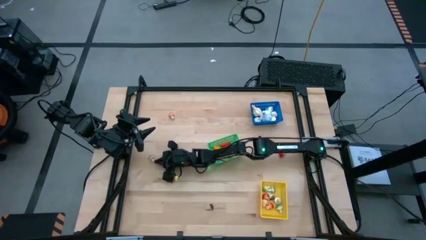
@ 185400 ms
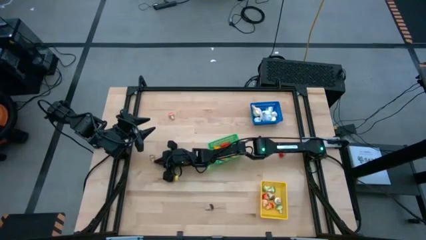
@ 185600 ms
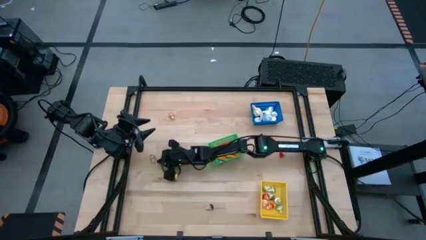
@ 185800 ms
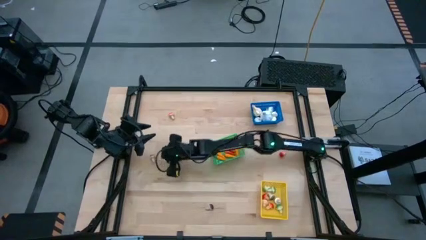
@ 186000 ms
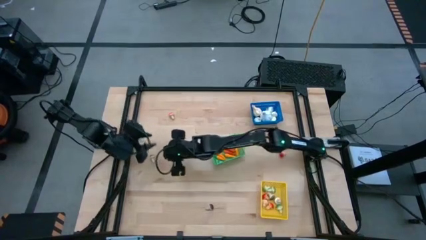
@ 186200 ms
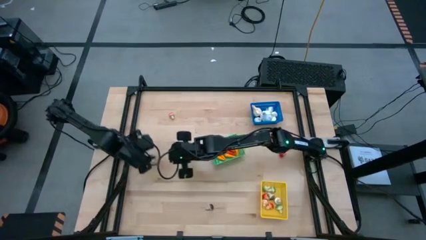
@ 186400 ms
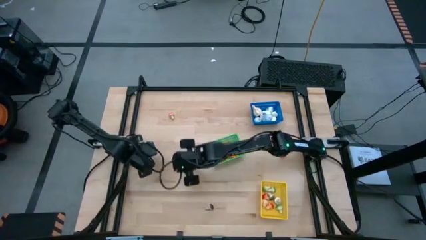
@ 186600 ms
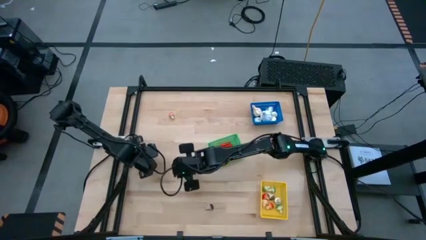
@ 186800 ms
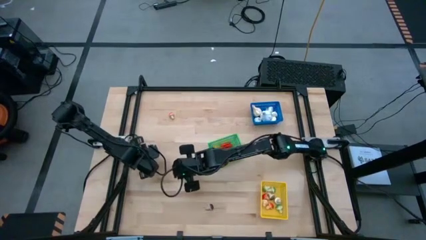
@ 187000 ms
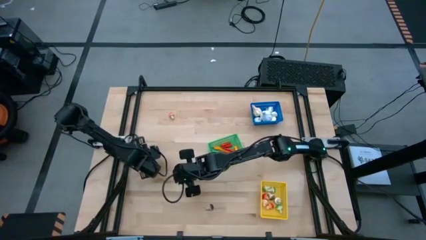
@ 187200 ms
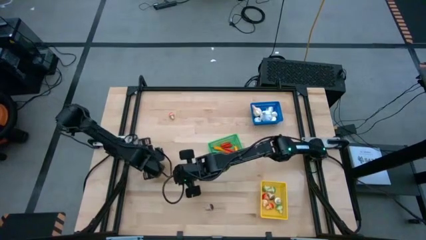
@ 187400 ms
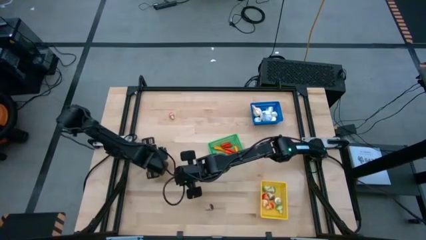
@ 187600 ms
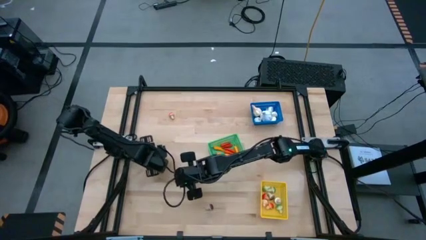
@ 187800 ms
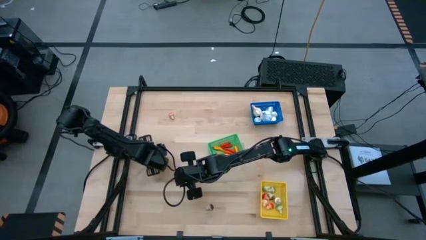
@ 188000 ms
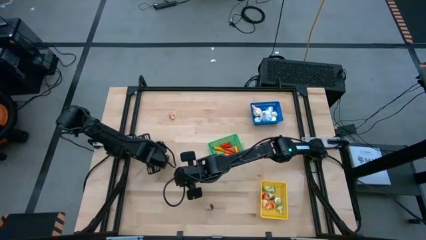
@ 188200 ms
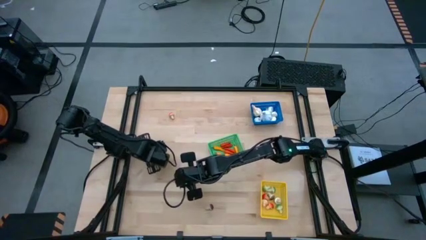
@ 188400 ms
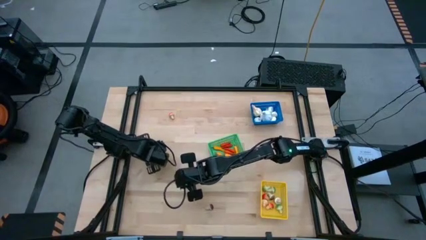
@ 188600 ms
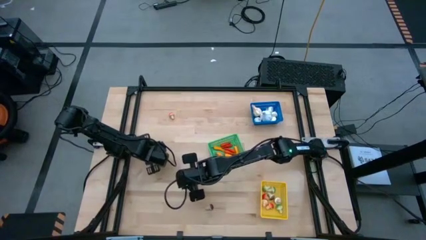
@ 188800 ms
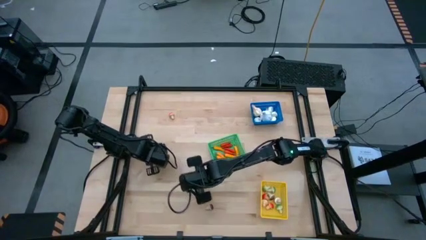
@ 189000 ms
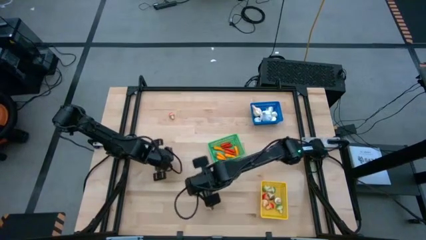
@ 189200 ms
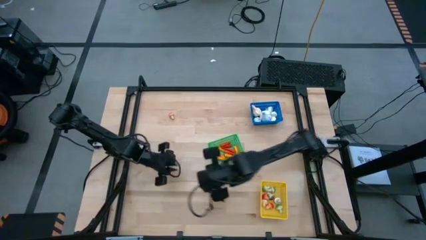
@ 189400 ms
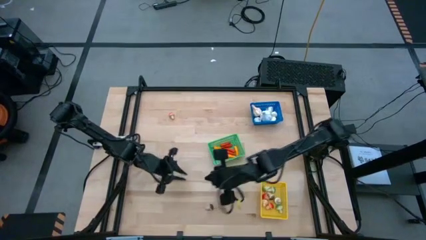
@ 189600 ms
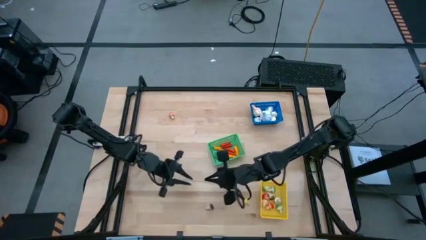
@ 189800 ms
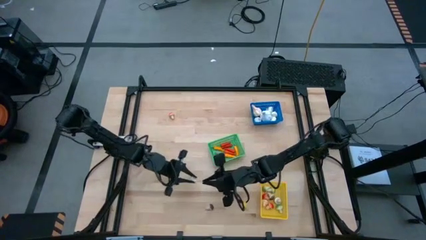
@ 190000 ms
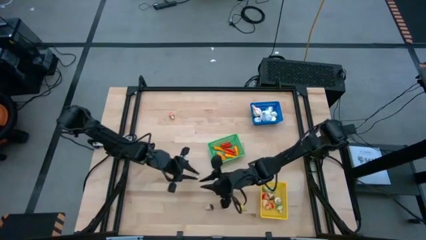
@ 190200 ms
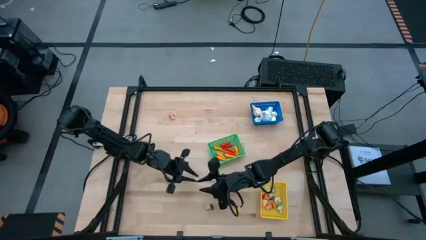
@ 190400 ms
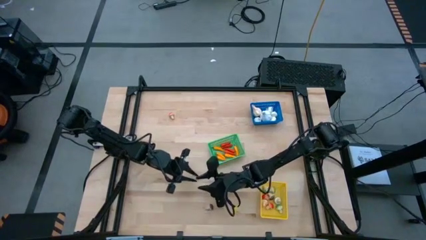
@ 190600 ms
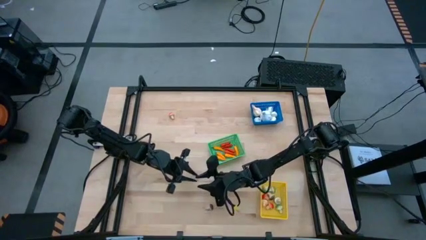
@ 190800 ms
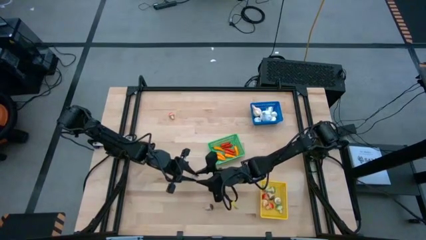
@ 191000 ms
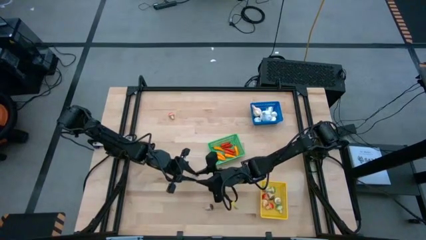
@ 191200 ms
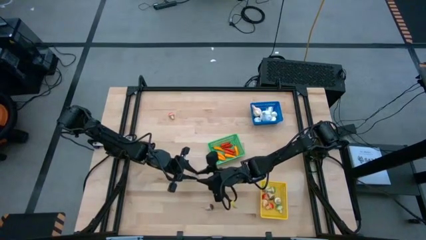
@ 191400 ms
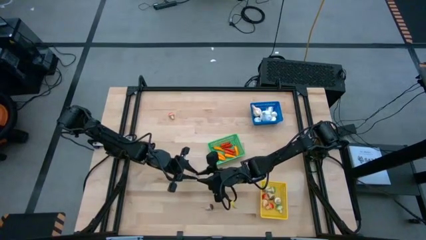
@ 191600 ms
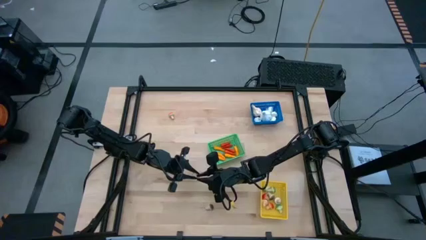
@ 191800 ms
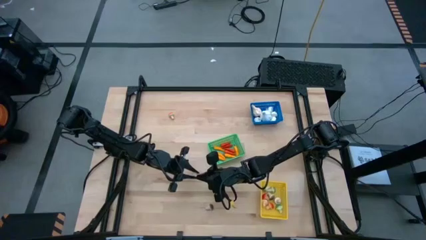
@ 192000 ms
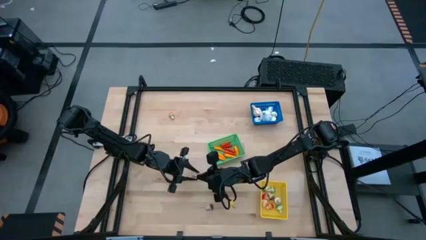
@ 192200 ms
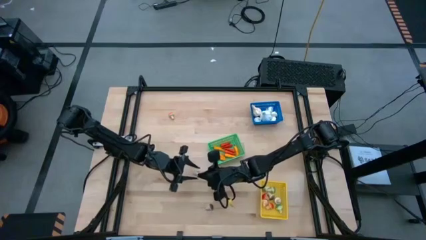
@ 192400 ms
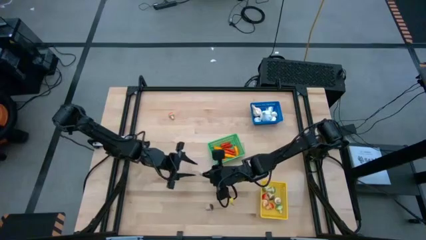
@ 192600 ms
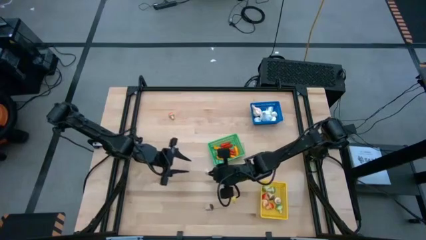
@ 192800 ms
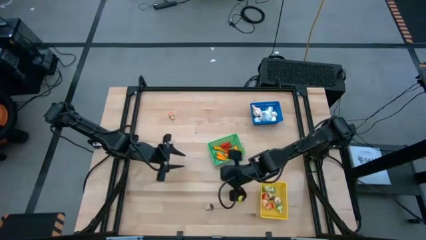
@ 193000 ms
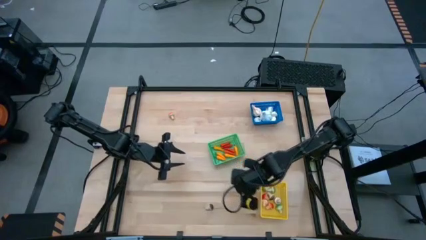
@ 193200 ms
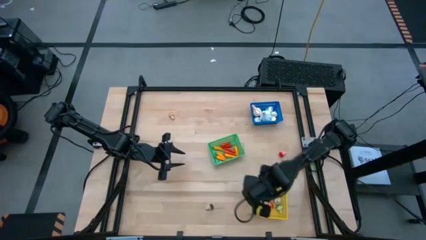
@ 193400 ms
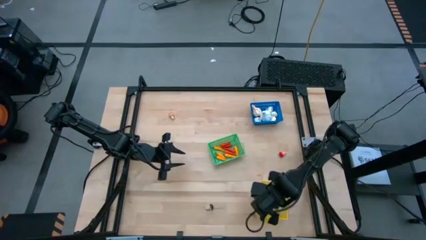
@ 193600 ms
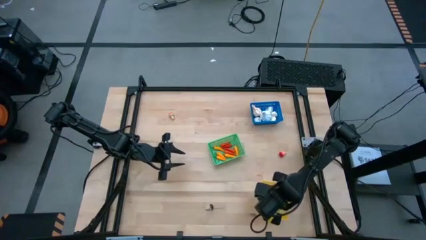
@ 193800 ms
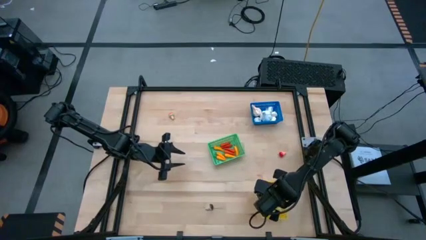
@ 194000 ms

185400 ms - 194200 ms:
Task: Sort produce into baskets
Put the brown mushroom into the yellow bin

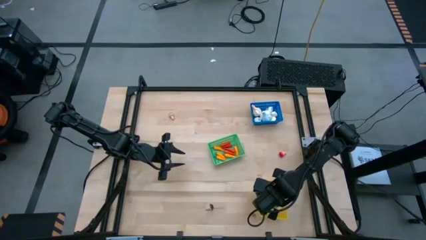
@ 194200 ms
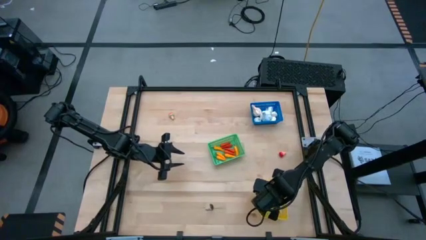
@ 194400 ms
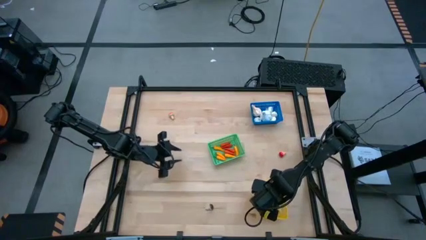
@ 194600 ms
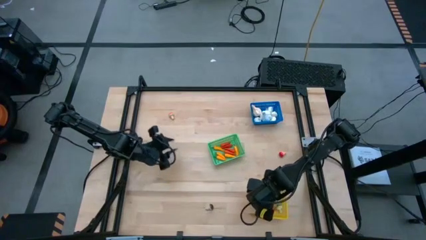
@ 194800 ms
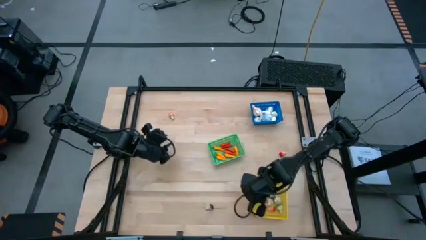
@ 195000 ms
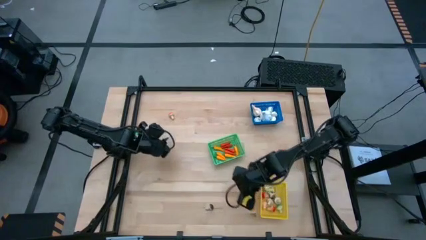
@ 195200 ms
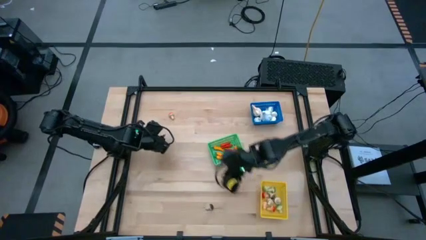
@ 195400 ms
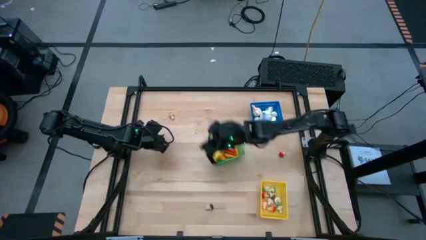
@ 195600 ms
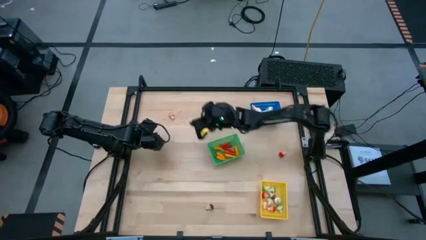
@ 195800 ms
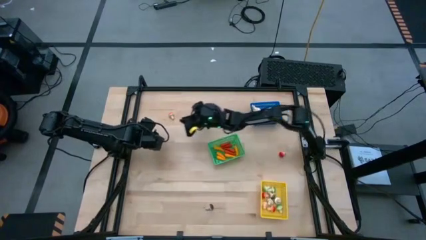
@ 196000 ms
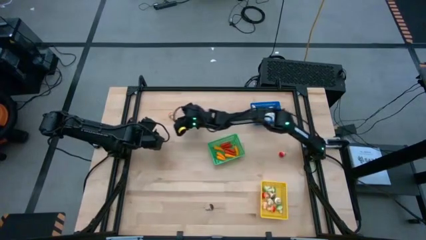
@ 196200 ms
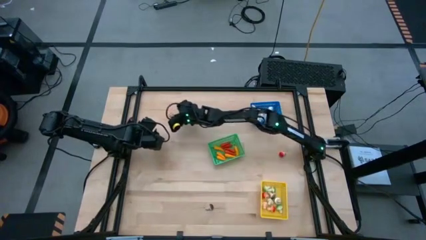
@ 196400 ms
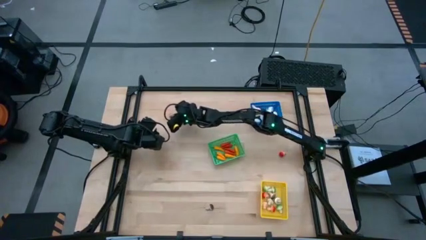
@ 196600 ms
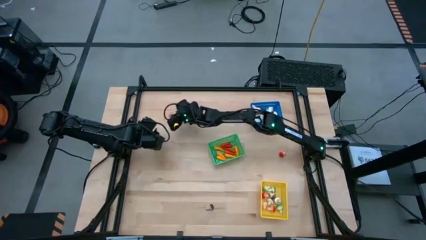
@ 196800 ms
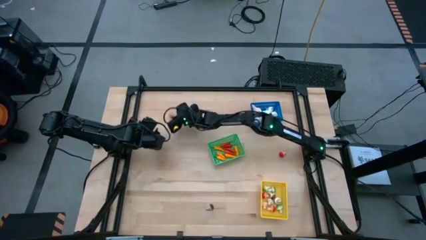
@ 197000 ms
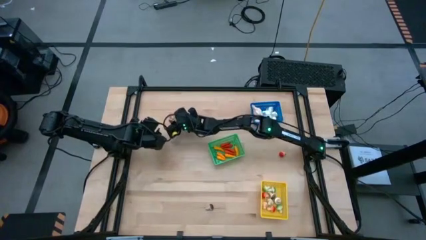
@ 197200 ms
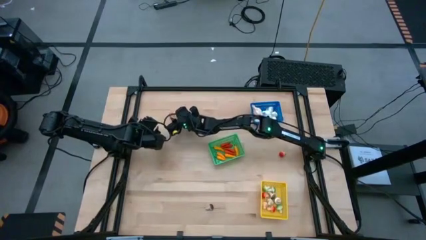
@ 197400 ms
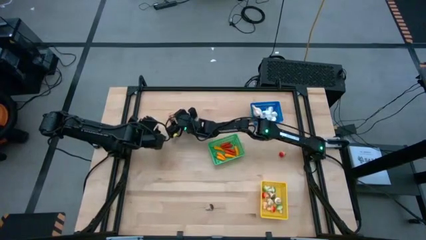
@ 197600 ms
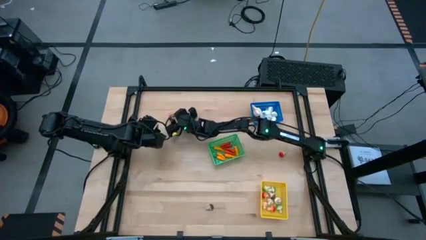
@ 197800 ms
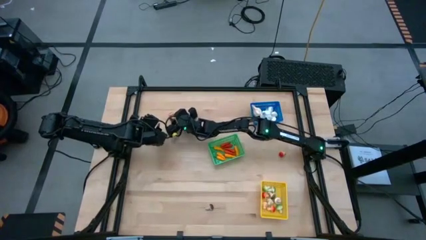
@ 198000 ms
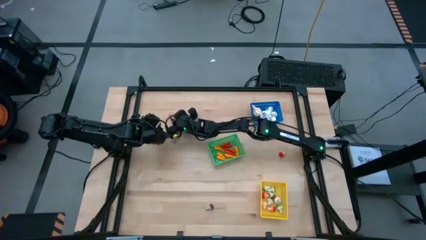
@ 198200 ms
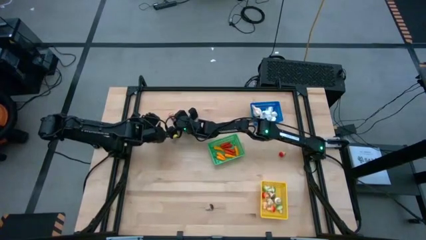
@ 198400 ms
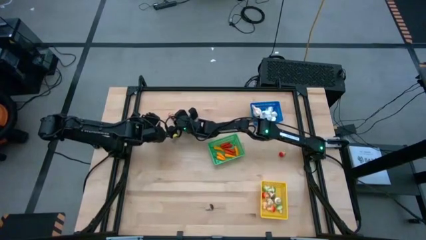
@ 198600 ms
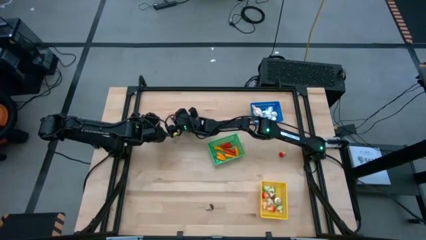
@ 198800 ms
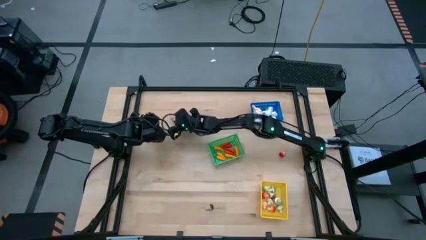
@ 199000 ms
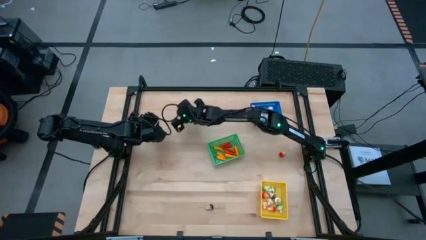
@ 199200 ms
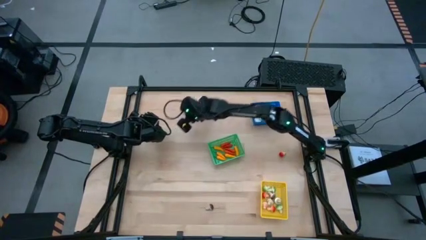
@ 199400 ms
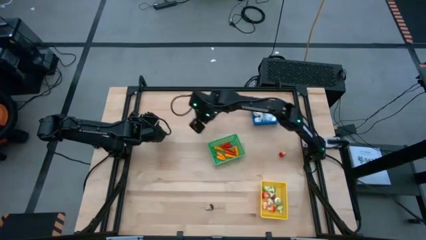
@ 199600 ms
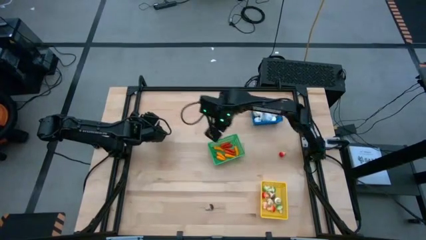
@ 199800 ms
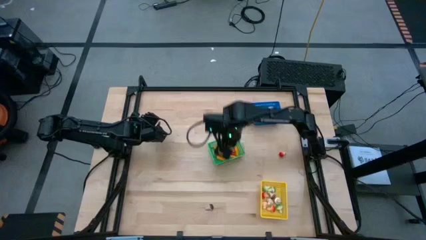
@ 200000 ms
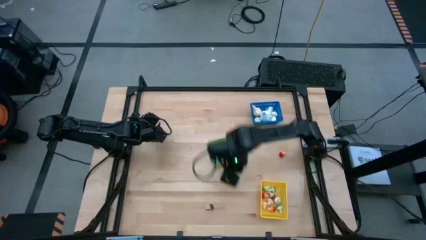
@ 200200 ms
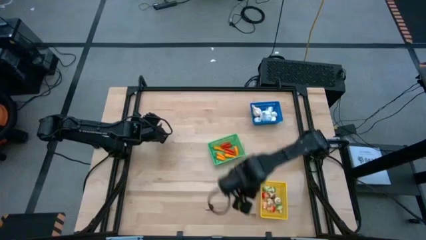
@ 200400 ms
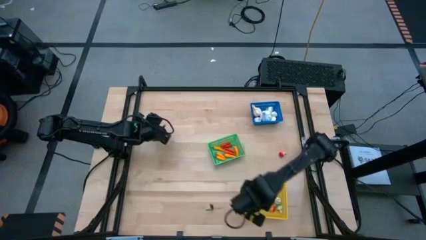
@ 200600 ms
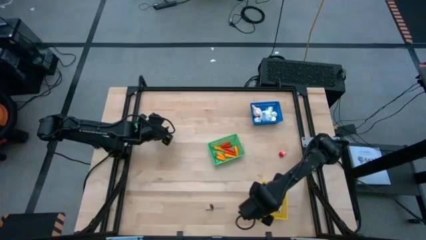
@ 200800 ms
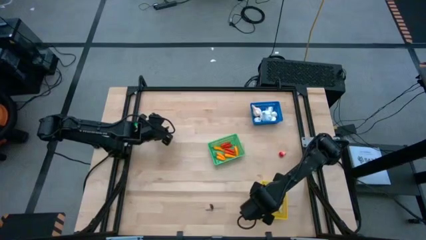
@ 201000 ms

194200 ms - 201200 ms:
Put the orange mushroom into the yellow bin

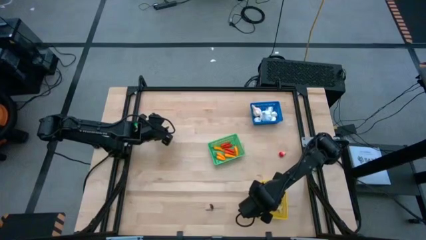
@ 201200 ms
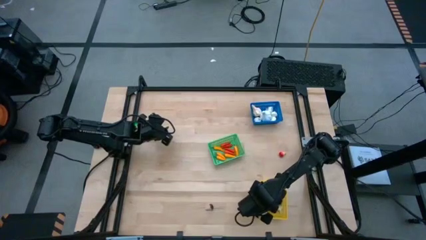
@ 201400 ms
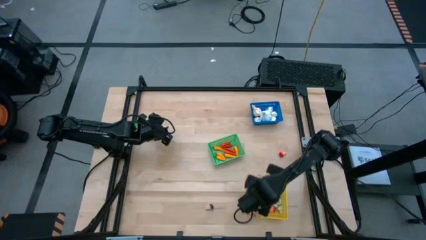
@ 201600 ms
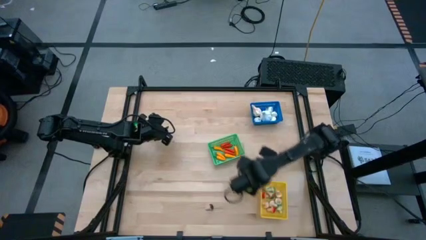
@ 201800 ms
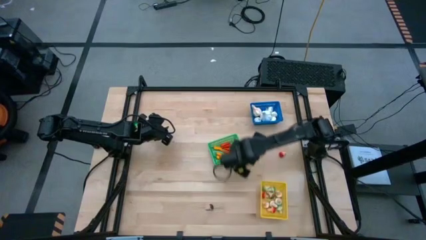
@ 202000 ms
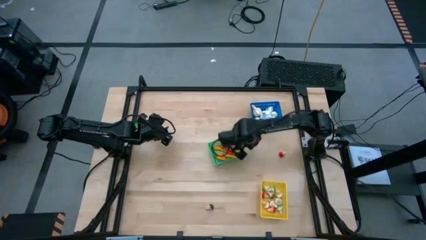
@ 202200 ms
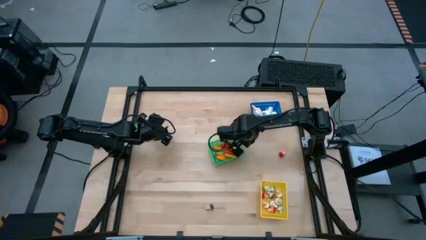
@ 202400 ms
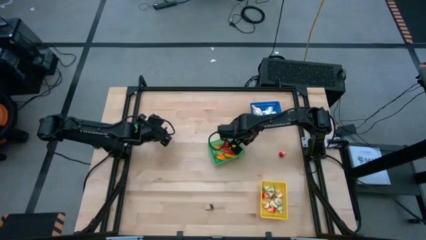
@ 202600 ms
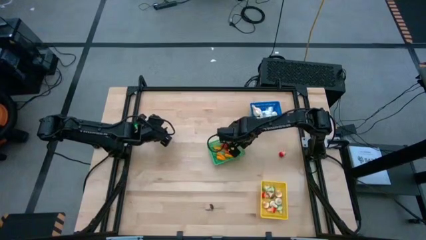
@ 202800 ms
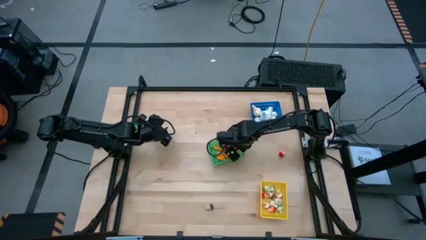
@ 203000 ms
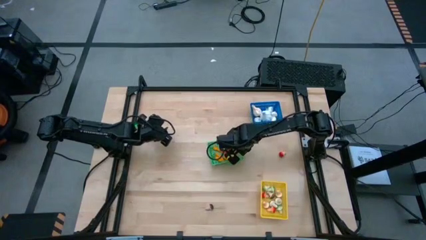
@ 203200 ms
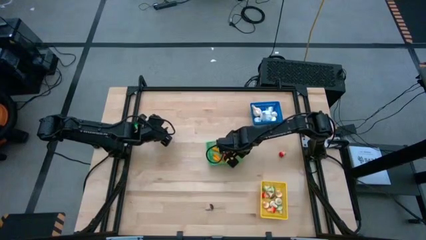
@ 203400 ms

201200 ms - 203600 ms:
Adjust the green bin
